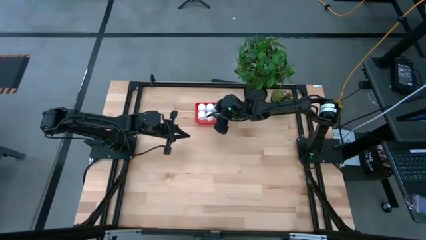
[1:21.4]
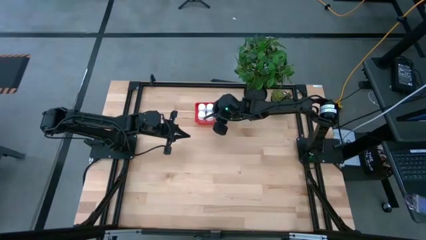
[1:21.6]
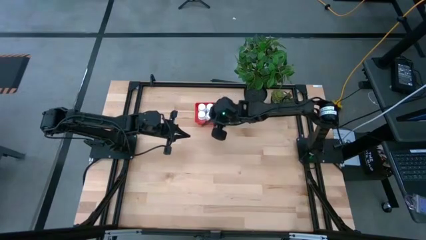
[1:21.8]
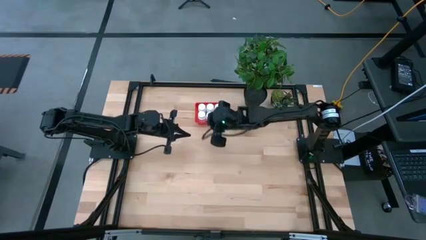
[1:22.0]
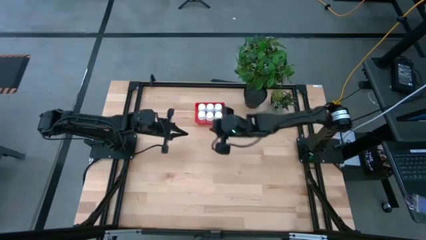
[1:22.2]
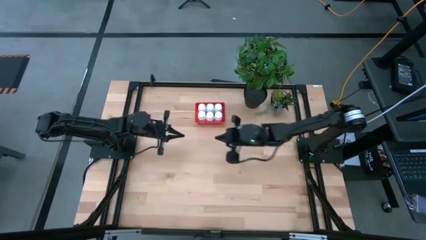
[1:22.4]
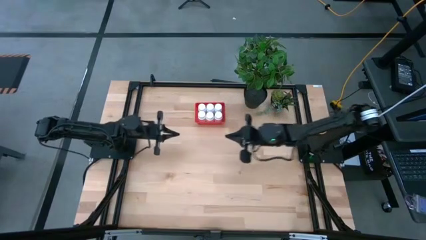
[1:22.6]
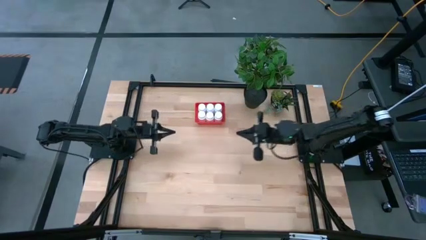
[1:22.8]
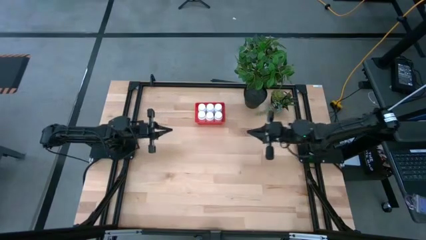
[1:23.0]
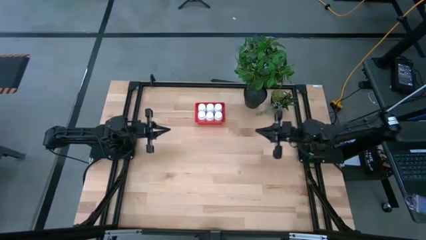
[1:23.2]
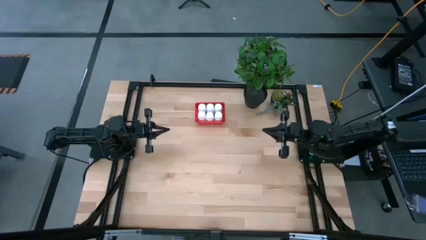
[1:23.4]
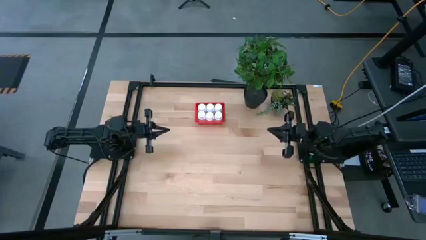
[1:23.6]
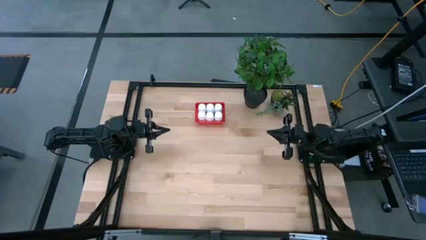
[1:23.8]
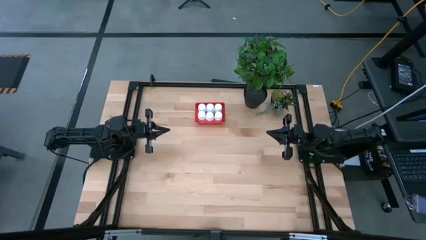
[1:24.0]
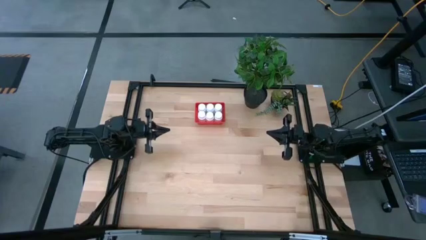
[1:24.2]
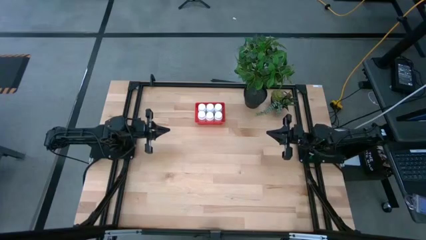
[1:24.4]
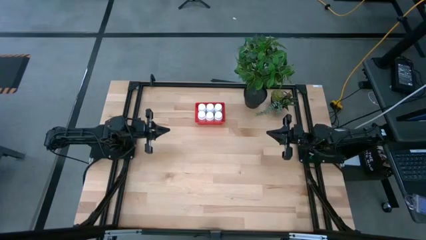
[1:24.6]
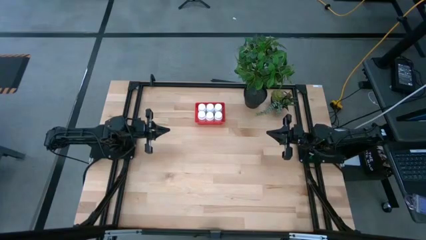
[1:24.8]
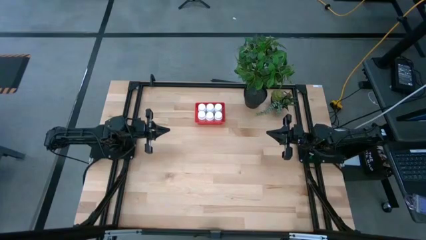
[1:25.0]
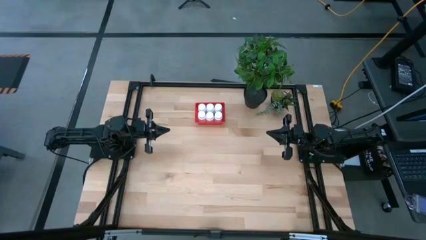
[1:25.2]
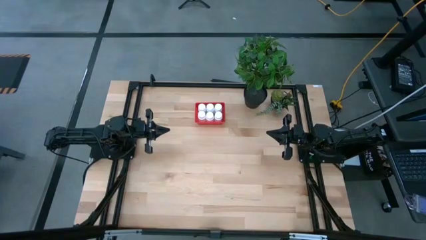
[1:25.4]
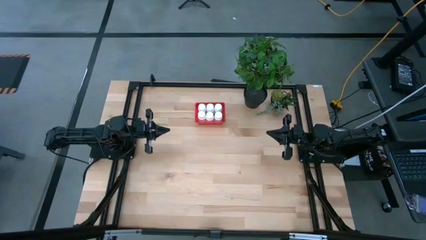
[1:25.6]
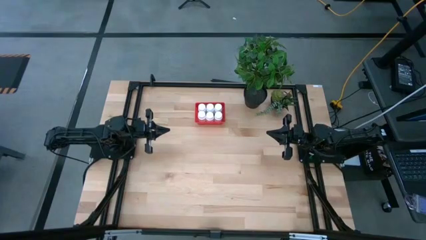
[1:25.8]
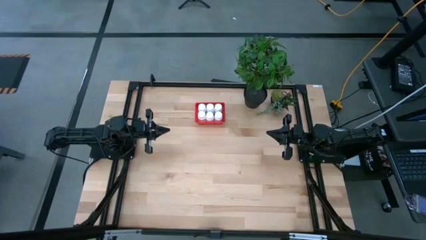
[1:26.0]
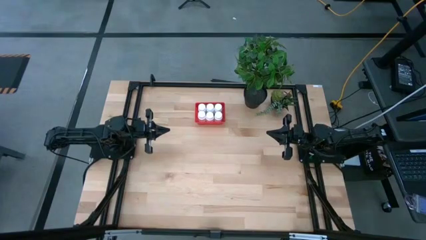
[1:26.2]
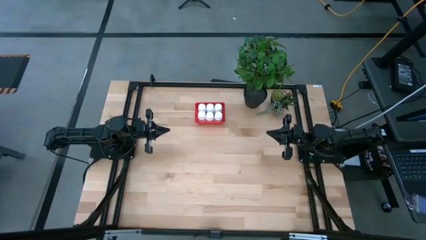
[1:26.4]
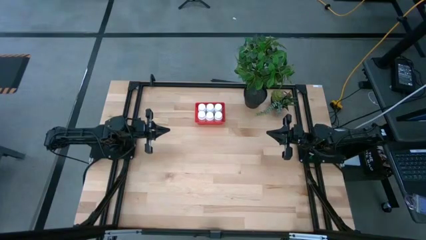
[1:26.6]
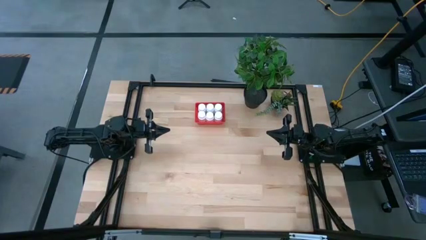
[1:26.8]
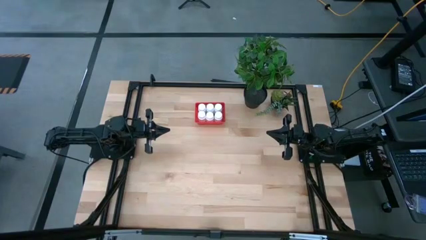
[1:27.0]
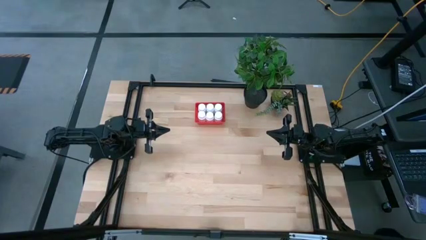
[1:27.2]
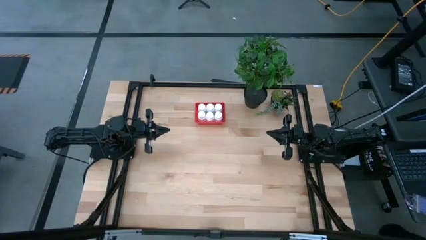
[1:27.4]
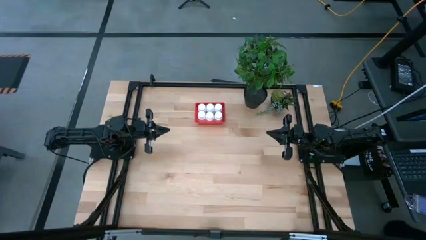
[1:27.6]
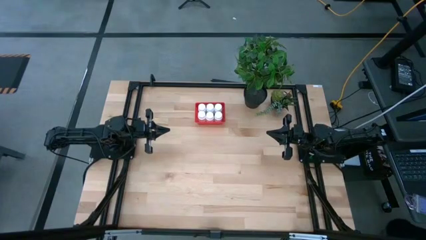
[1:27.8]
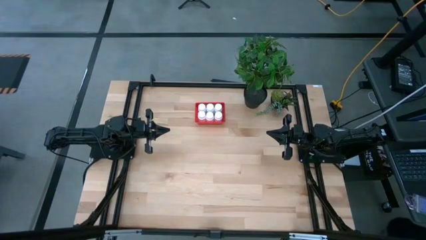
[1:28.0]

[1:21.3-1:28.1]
Task: Pick and place pill bottles into a basket
Return to Home Position

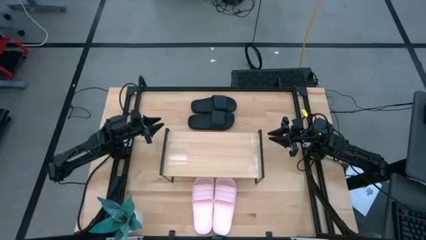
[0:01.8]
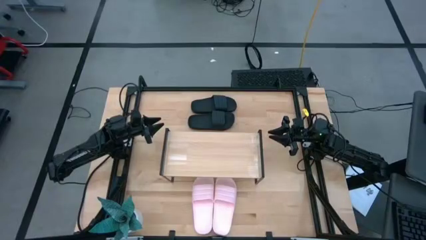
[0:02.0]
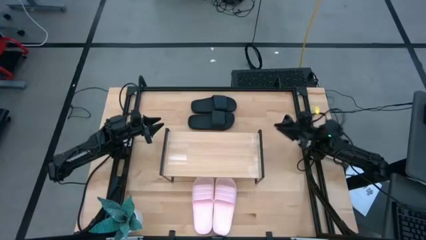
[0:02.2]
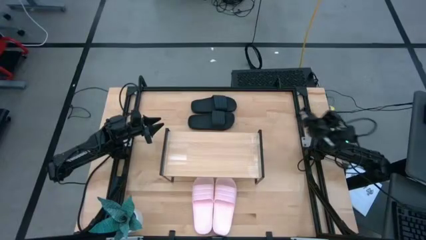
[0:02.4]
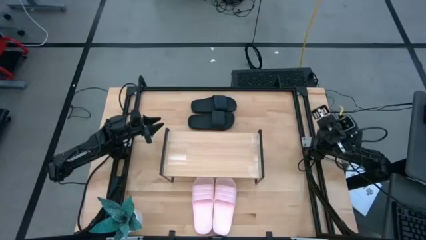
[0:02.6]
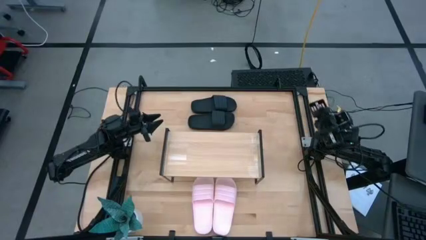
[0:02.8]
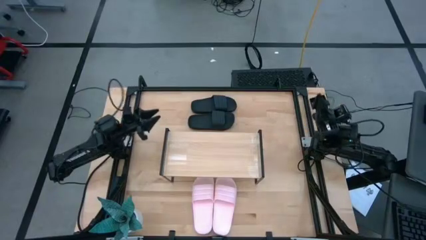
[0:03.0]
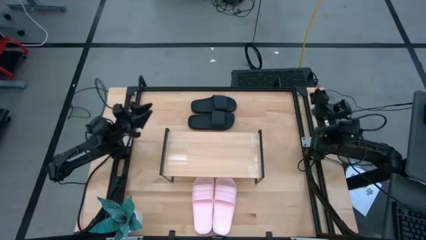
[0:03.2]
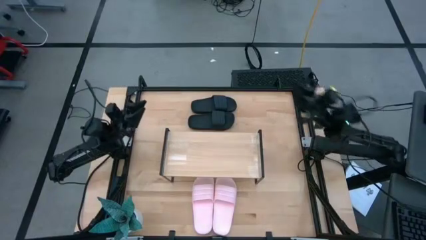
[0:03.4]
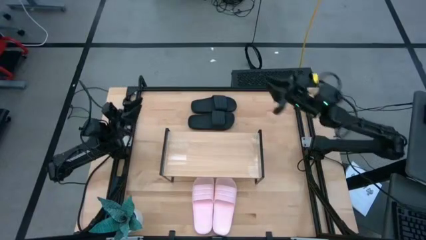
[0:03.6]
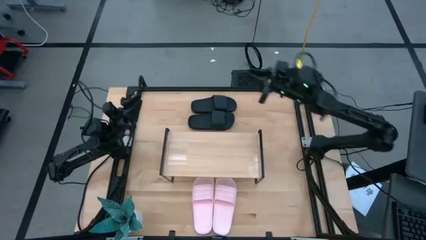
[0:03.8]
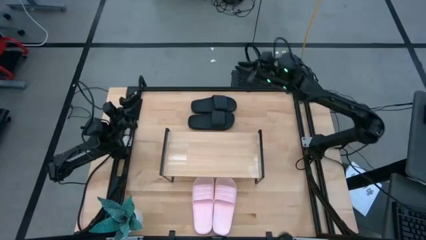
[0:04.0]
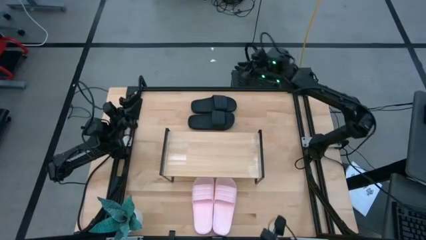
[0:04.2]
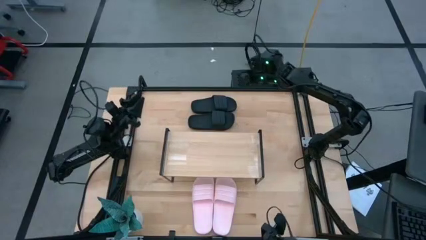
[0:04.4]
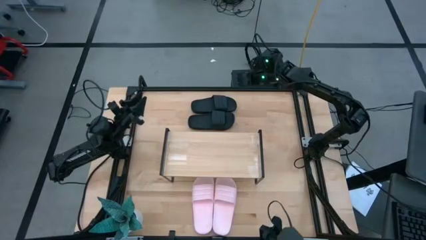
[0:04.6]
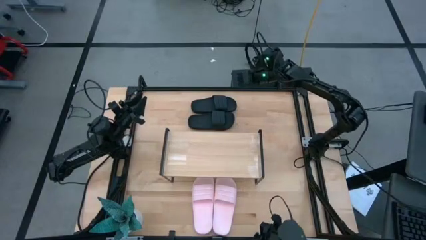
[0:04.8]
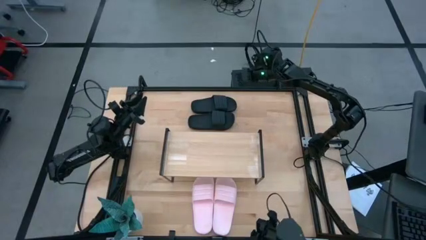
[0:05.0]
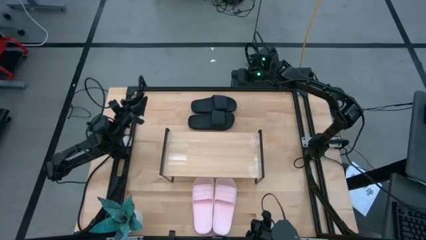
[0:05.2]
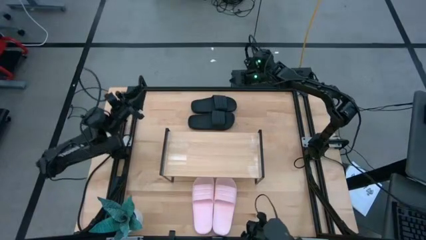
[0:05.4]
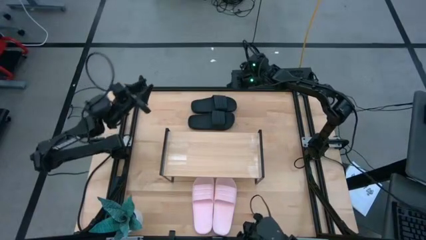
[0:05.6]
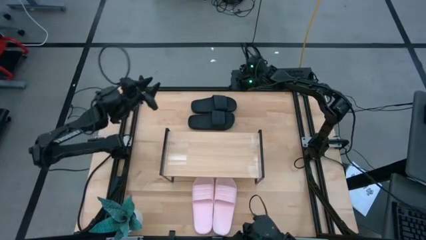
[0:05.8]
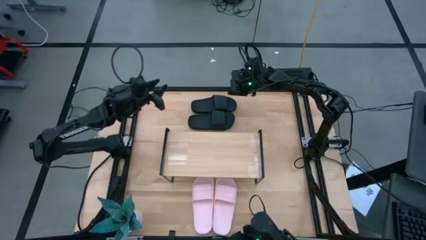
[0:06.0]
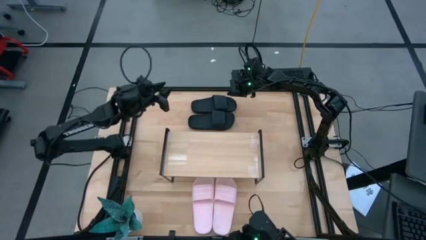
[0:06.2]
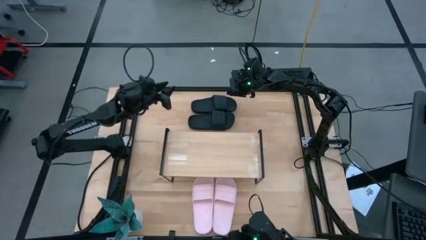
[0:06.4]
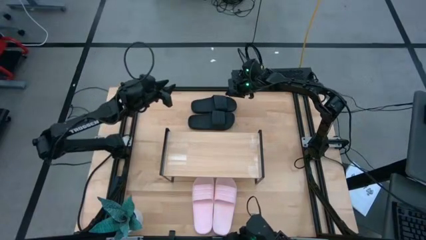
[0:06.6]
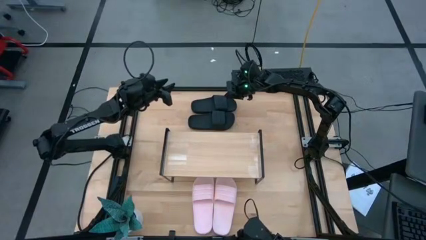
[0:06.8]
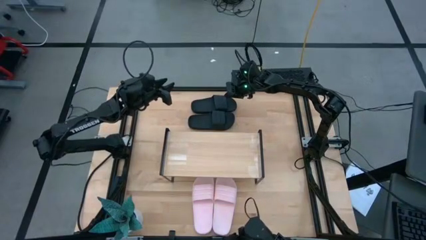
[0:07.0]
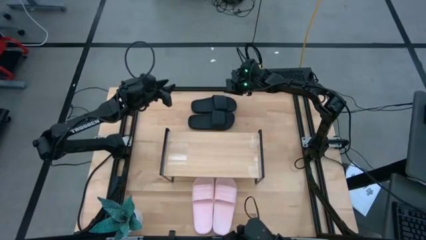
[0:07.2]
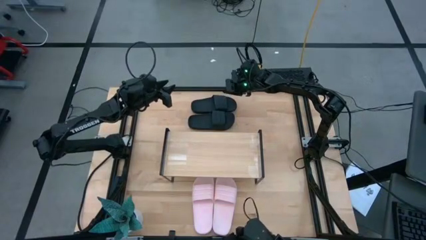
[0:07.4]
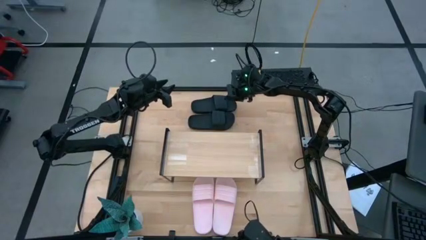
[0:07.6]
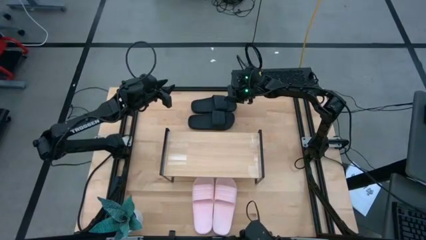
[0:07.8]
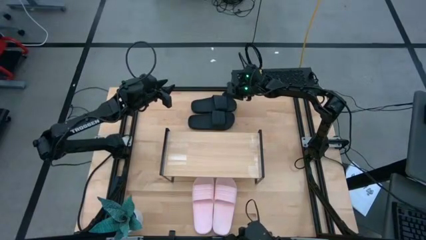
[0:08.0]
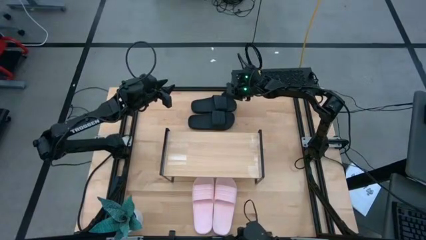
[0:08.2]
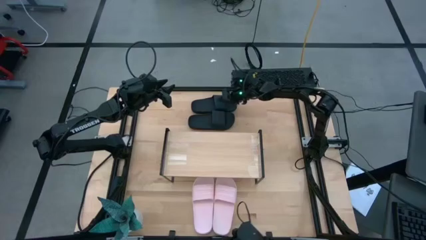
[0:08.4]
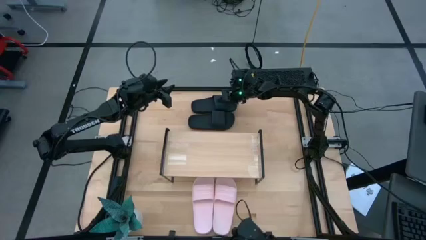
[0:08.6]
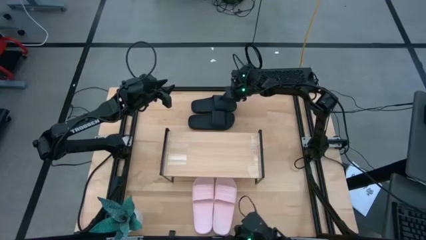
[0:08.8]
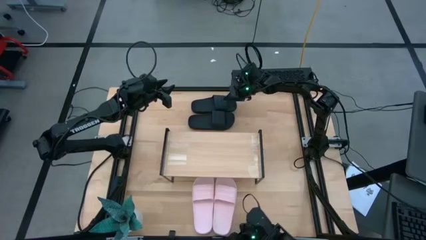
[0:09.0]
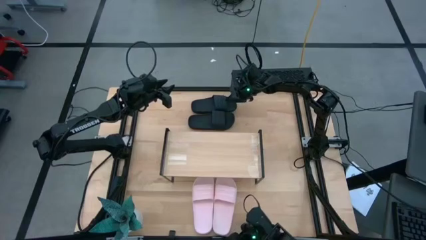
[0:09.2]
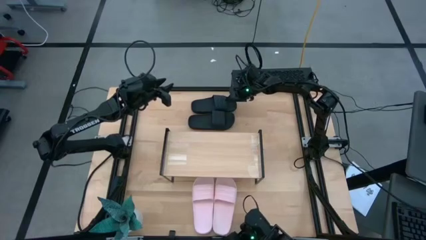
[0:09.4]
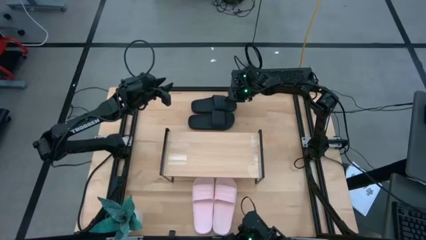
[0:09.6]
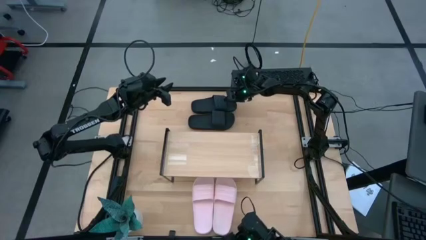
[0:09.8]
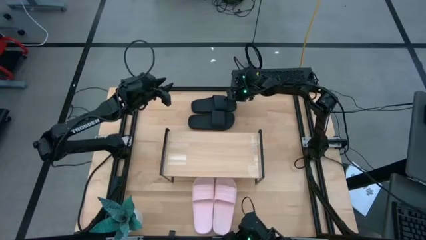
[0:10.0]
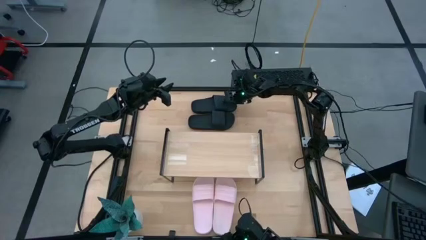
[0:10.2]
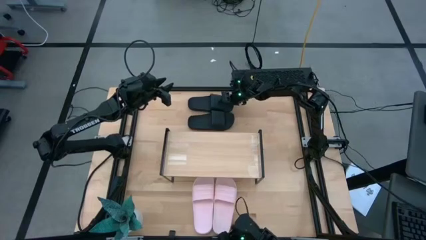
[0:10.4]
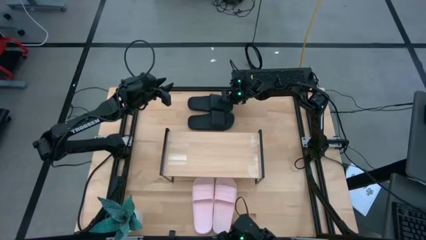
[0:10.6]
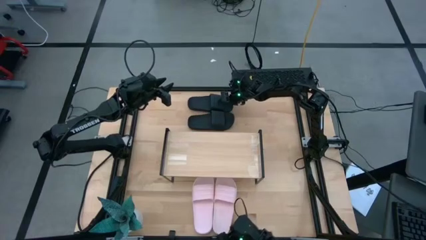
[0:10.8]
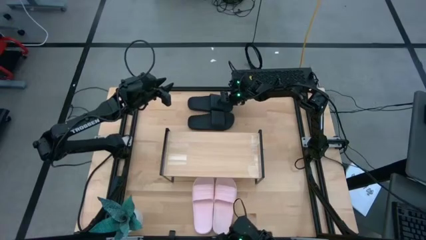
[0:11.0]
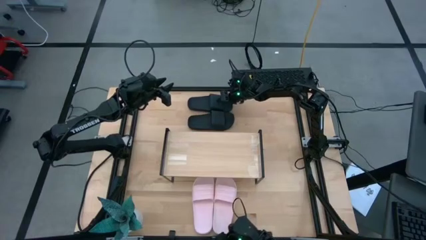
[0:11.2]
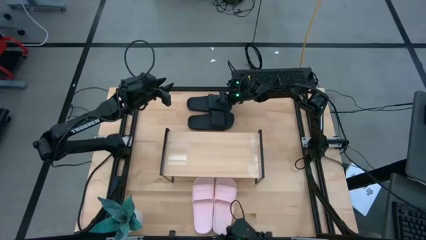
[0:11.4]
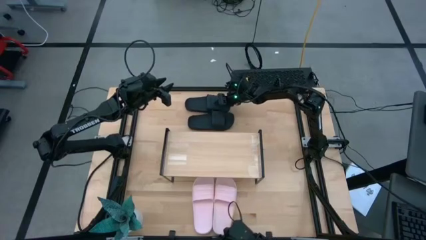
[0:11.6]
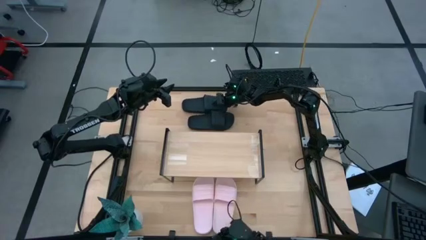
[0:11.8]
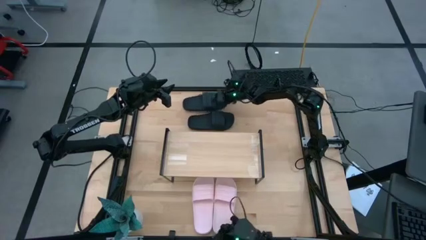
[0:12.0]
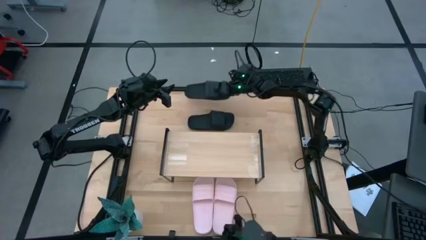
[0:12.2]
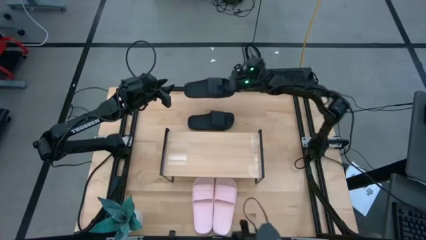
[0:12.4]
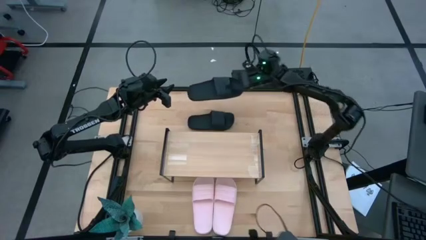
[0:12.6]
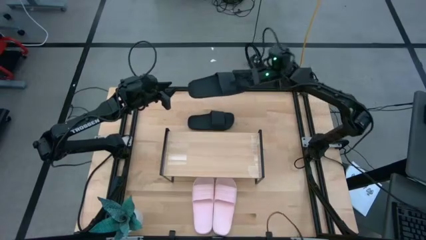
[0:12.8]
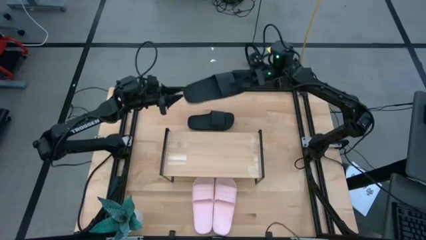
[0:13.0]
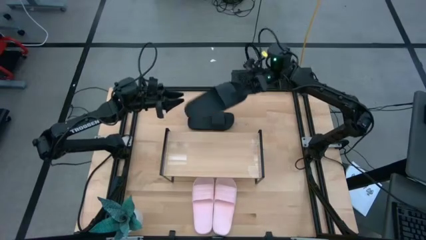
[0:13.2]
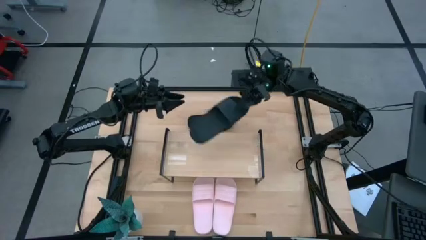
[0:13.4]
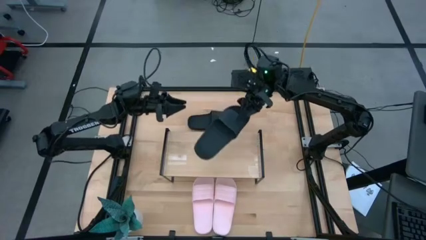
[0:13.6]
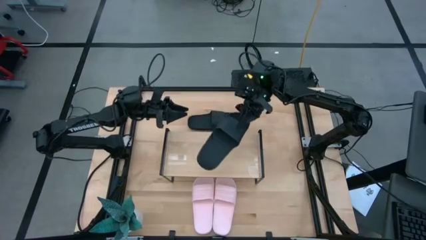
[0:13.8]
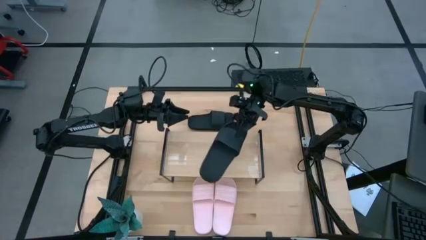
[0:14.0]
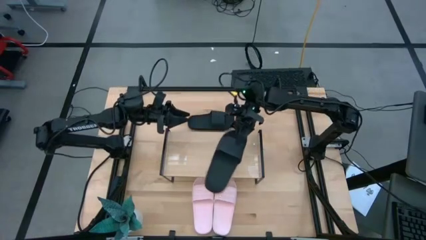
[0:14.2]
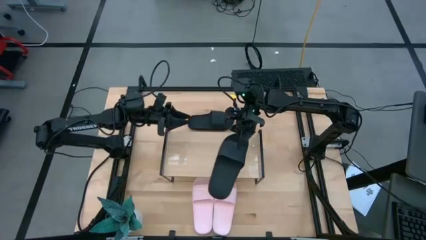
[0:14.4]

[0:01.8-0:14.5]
Task: Pick and place slides into the shelf
Put the top black slide on the shelf
